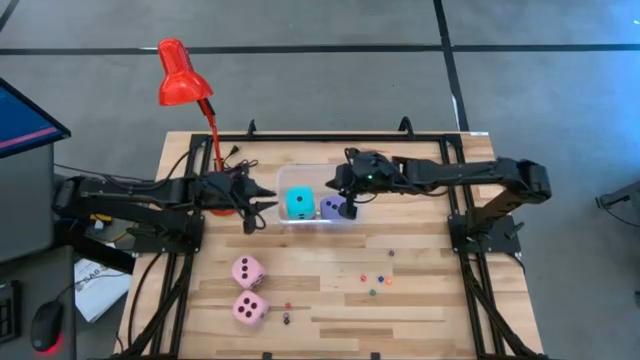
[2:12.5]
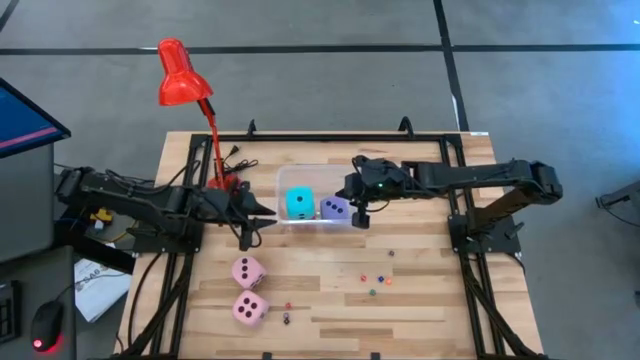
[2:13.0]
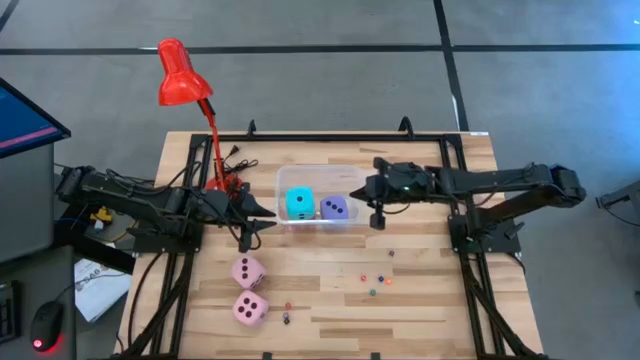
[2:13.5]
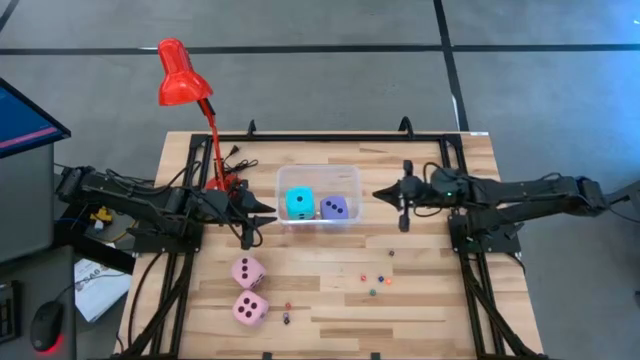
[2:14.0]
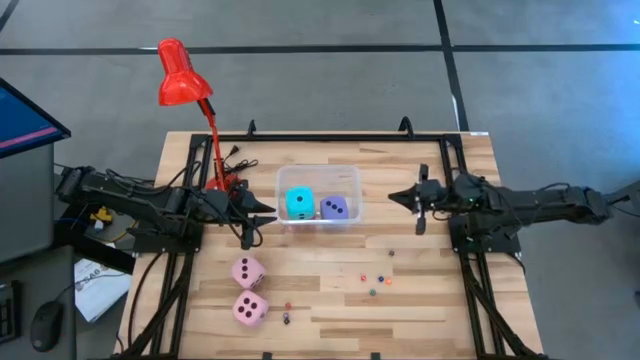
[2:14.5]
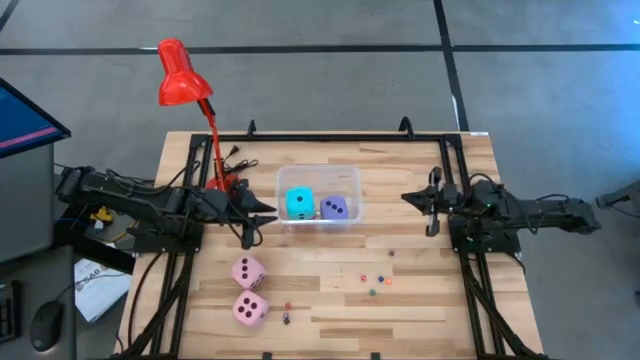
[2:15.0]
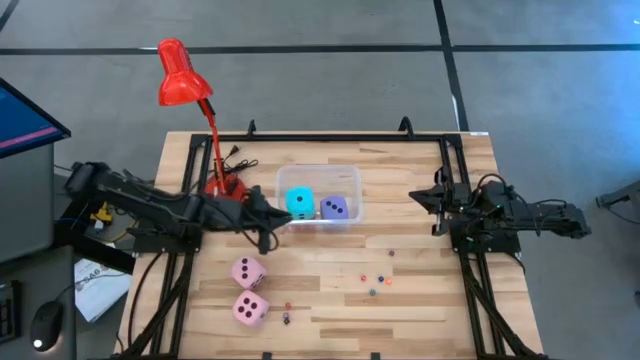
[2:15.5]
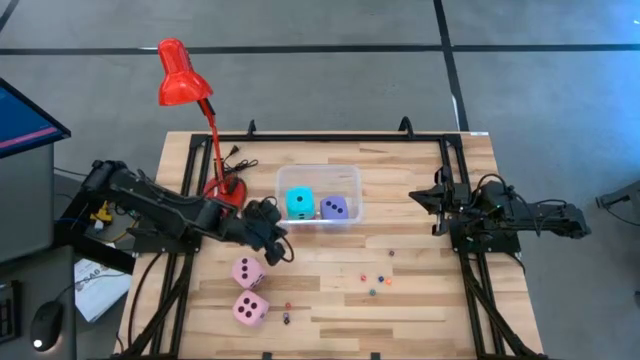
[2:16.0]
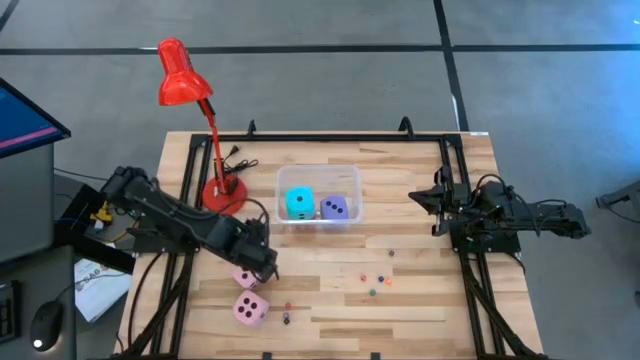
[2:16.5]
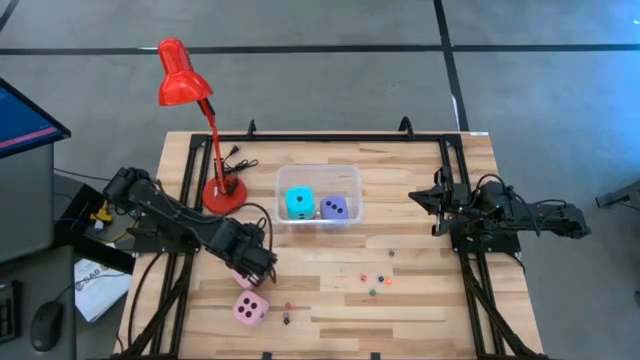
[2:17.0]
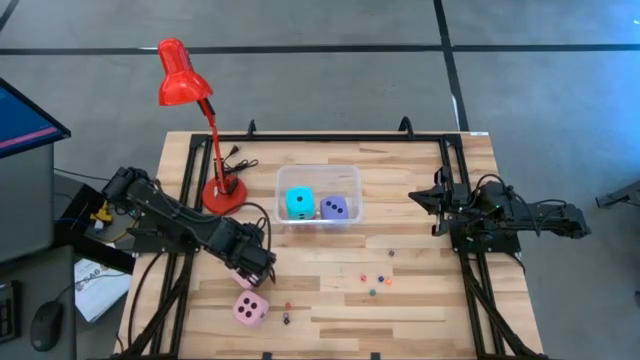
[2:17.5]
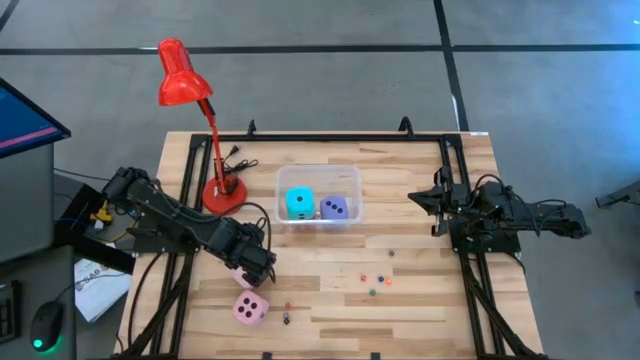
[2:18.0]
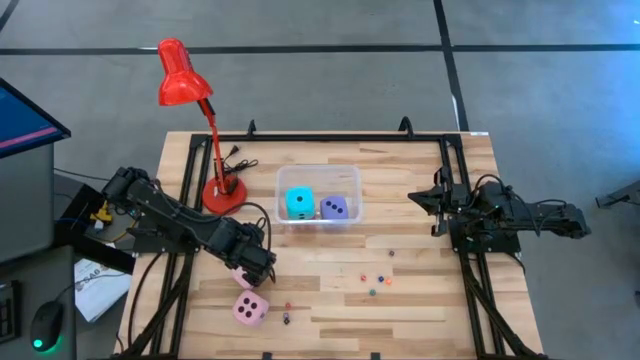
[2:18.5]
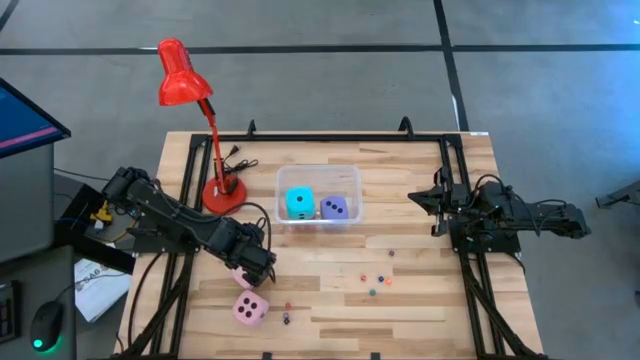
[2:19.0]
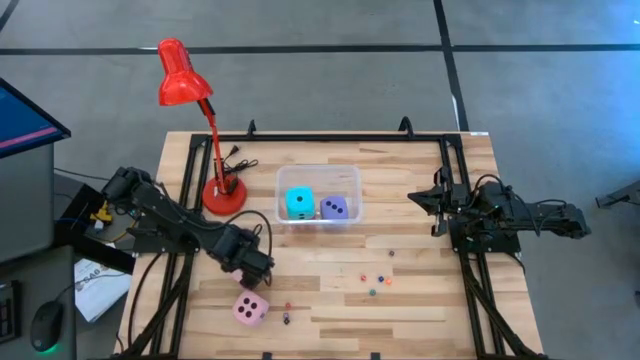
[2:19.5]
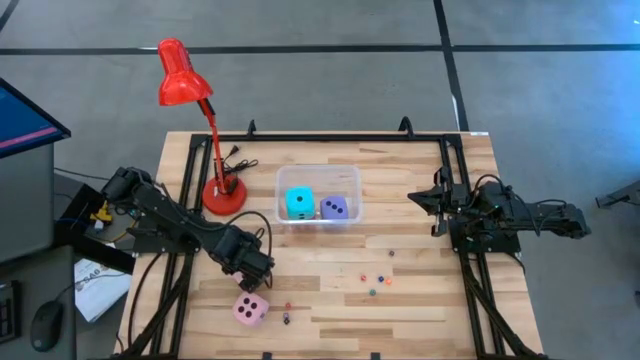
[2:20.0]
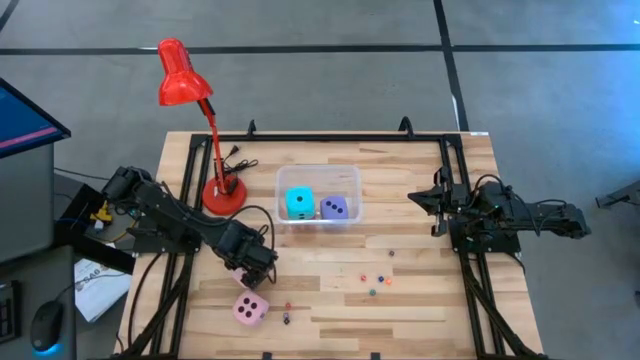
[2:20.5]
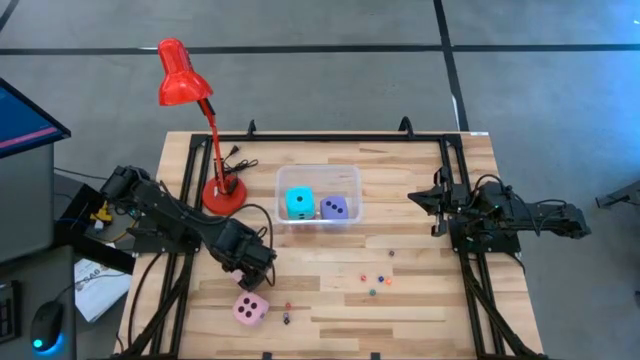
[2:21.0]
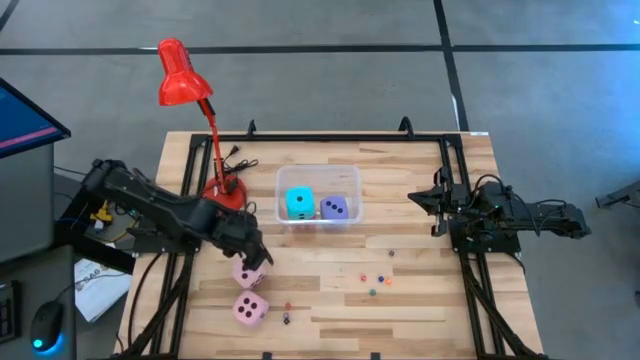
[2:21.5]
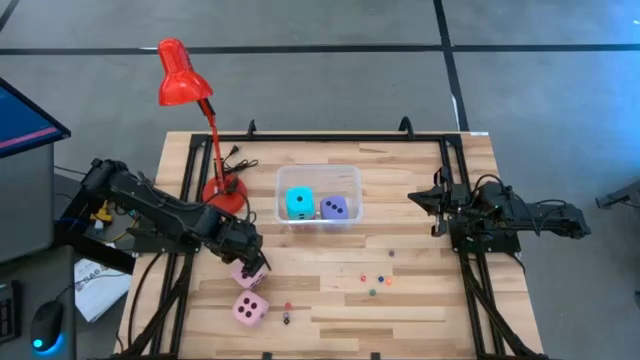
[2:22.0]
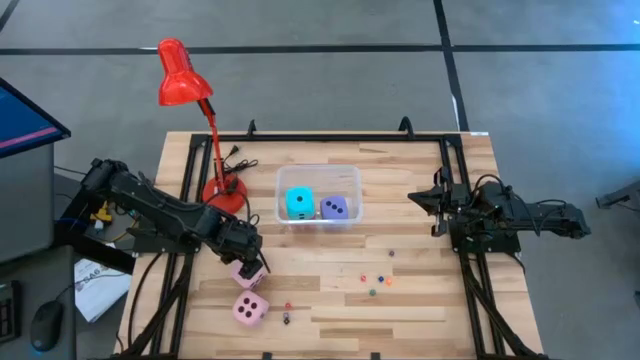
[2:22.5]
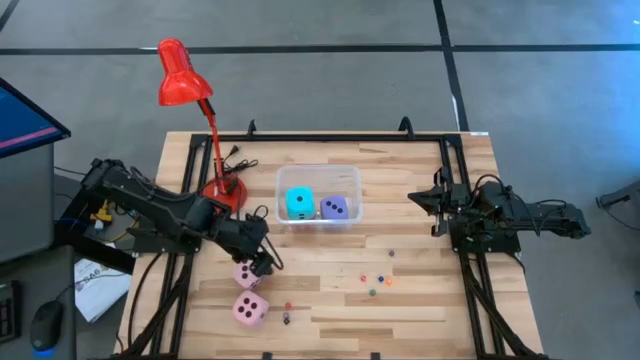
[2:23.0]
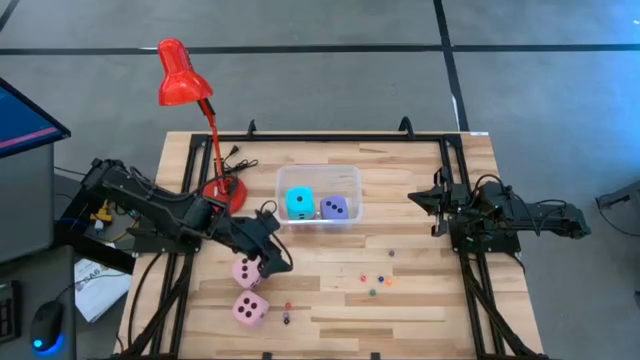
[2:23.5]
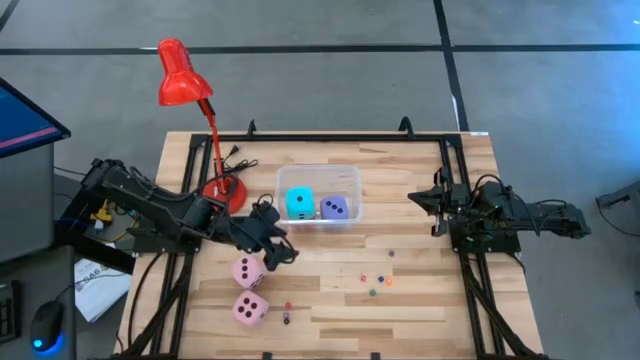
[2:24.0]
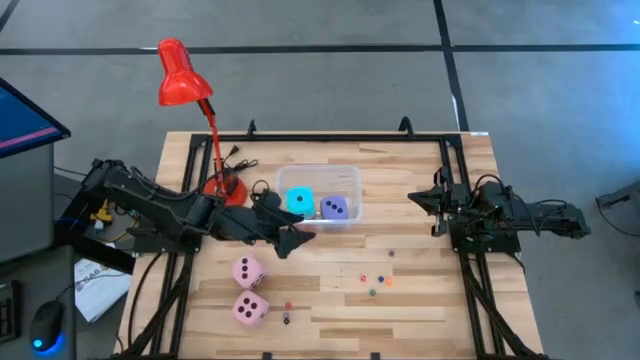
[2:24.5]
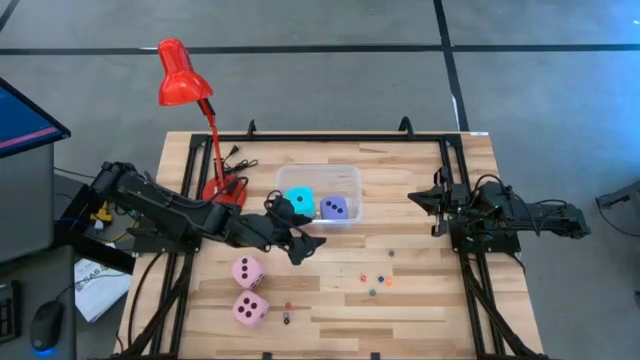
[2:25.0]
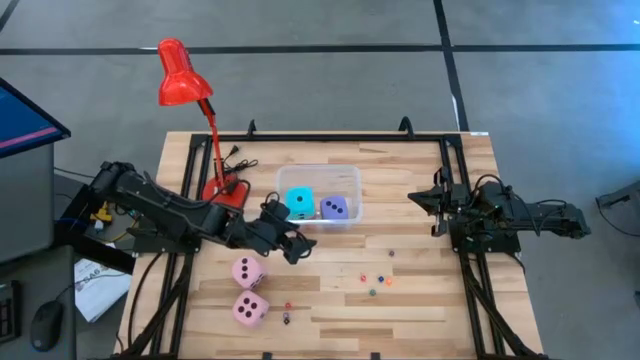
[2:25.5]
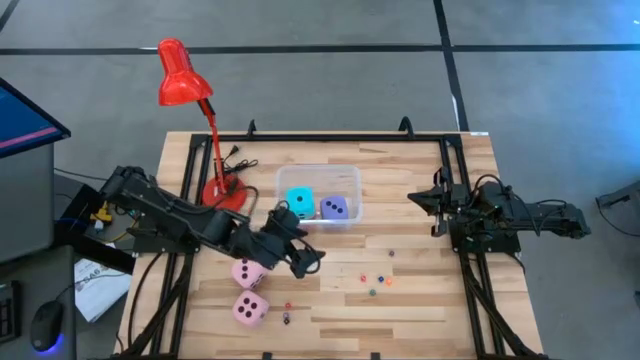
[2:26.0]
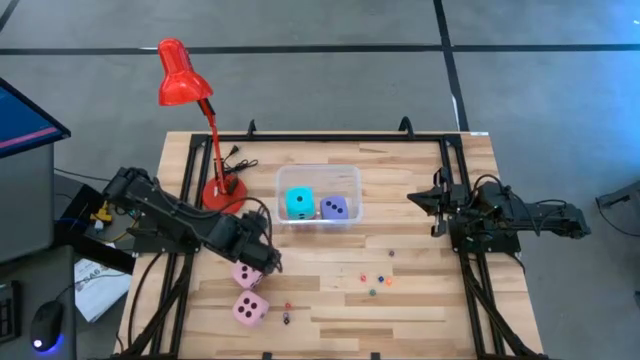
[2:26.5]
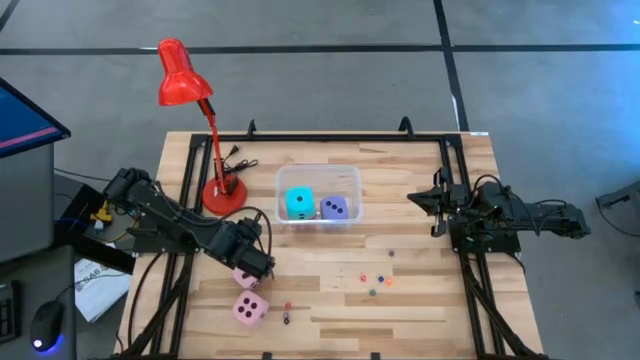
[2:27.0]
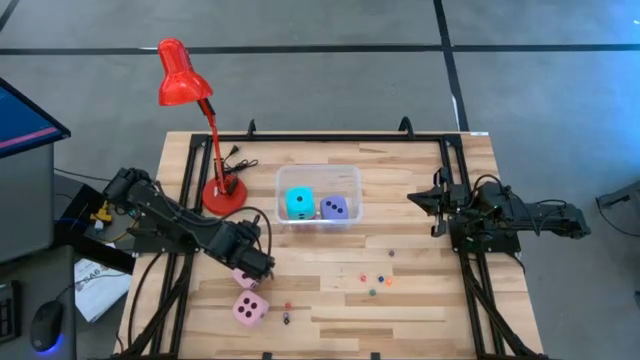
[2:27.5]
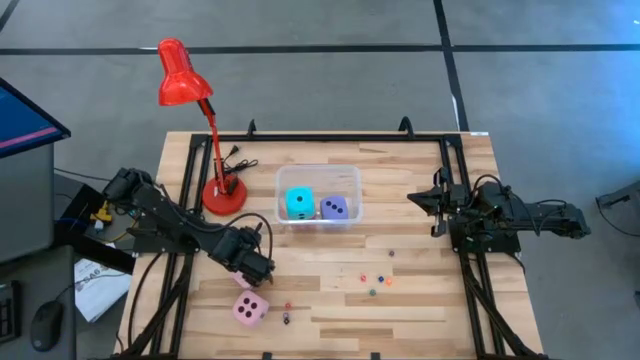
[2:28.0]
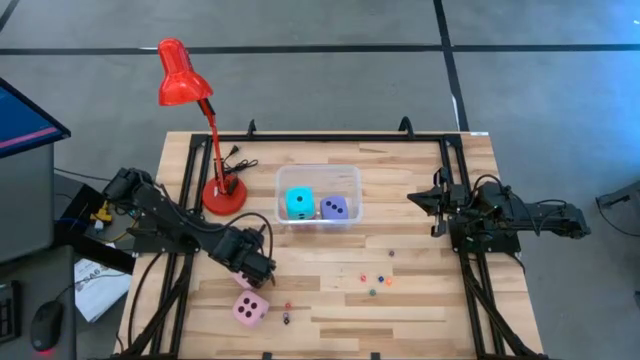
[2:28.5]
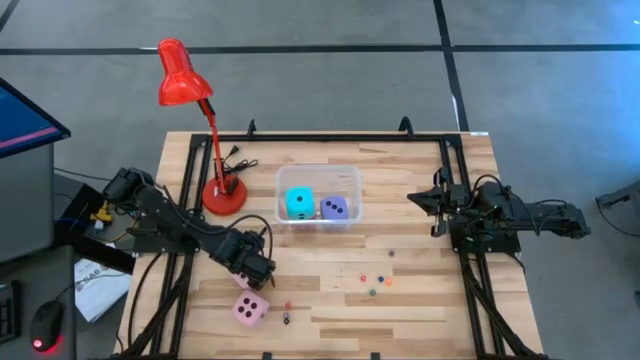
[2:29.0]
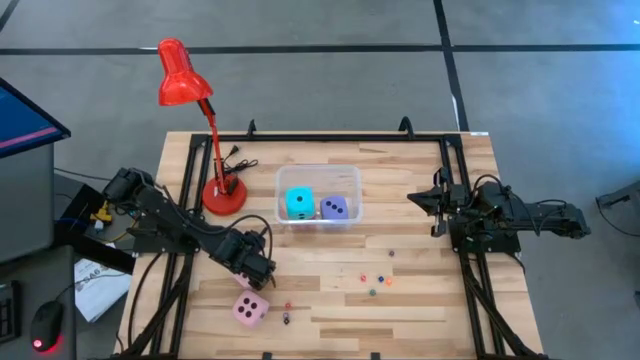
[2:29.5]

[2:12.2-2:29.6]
Task: Pick & Place Dice
Put the large pink die into the transparent bin

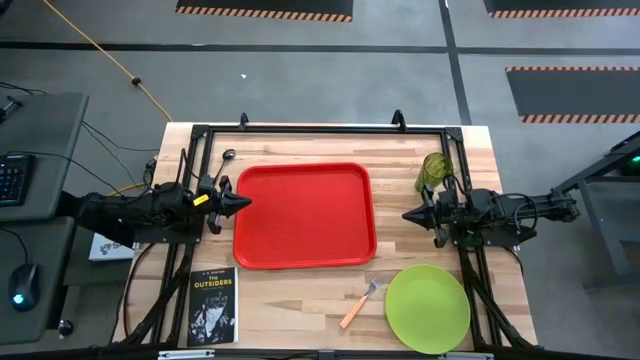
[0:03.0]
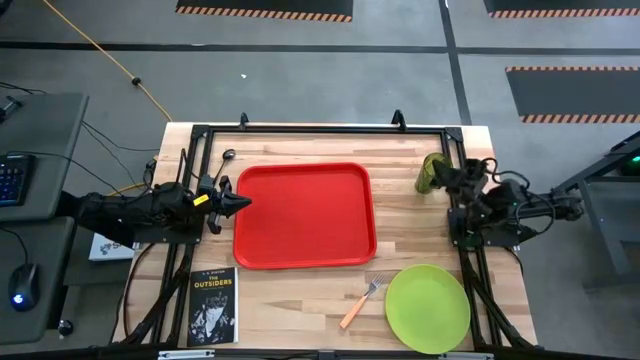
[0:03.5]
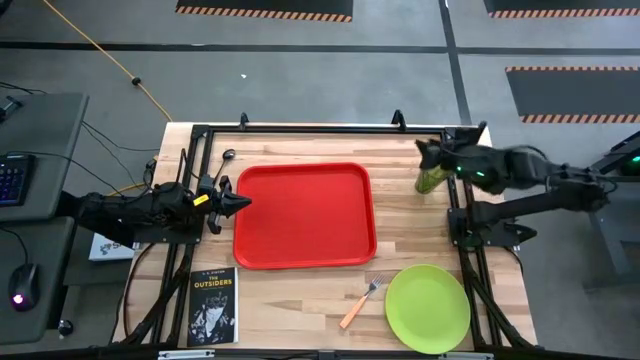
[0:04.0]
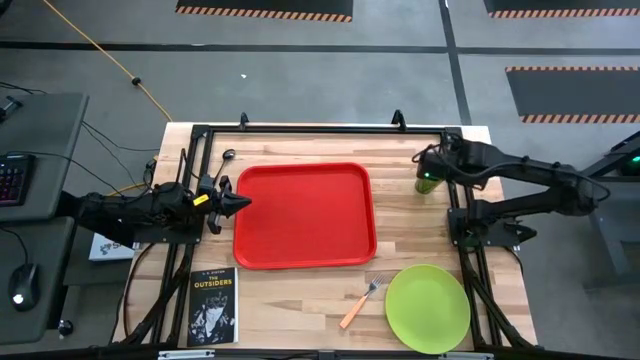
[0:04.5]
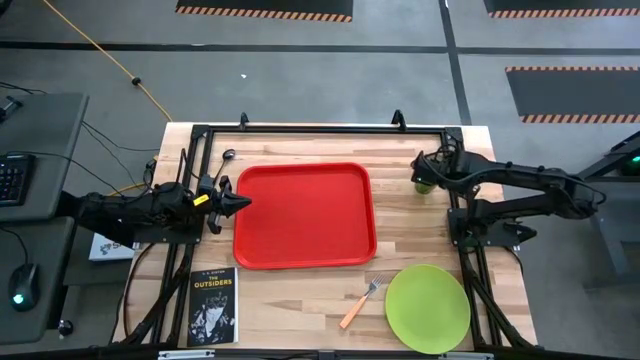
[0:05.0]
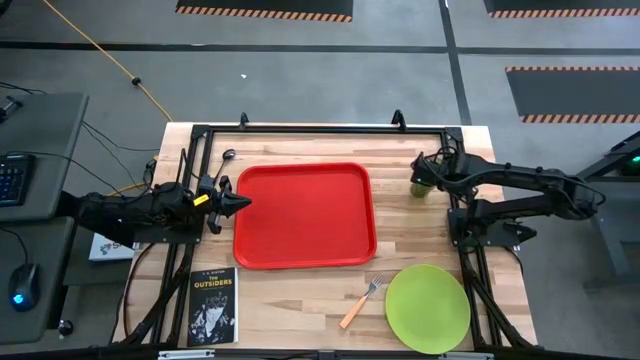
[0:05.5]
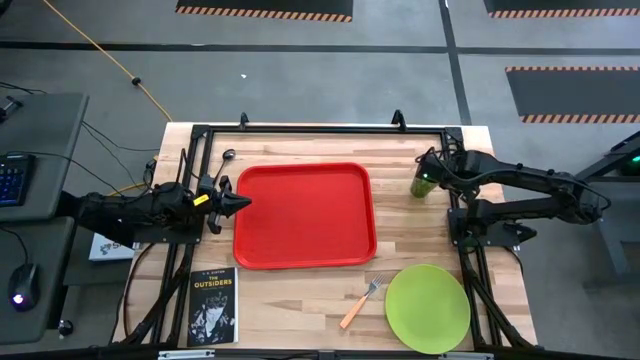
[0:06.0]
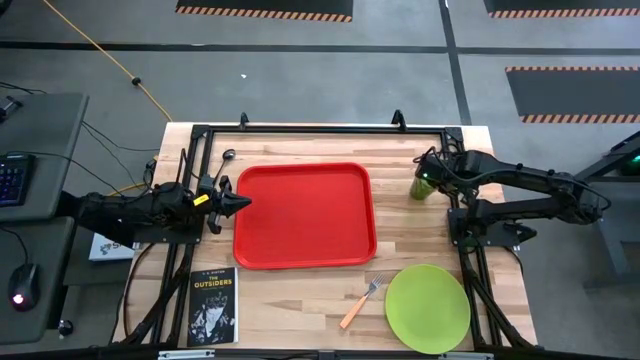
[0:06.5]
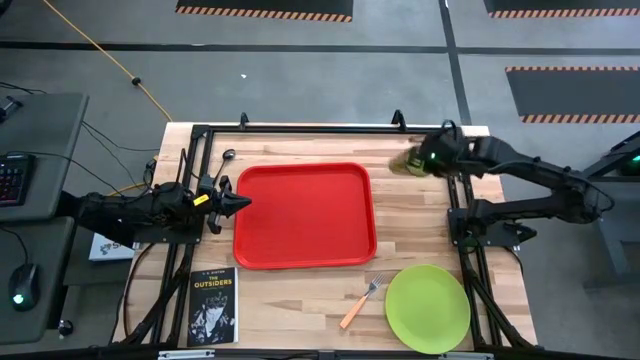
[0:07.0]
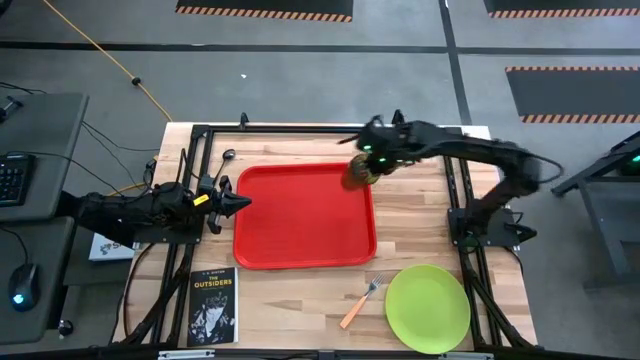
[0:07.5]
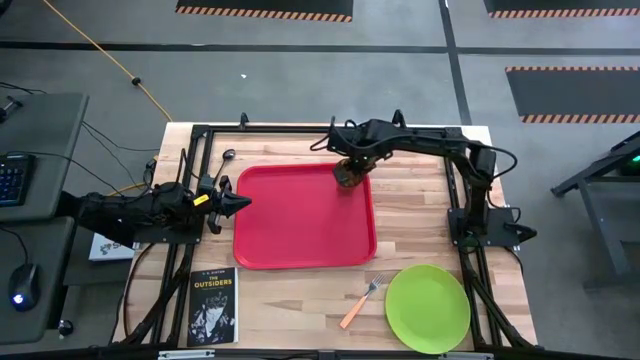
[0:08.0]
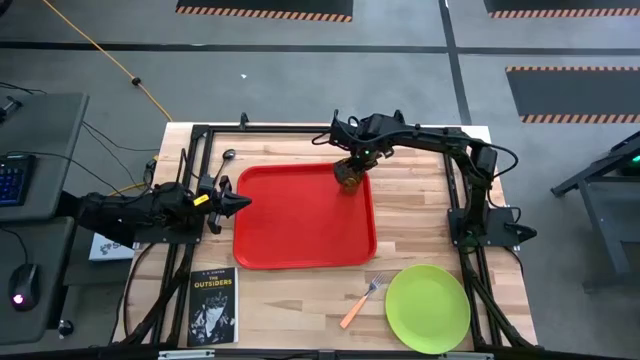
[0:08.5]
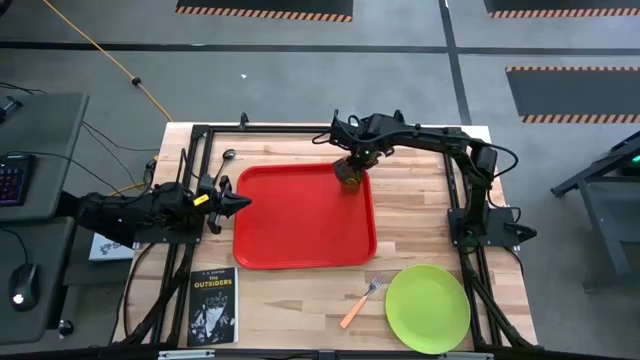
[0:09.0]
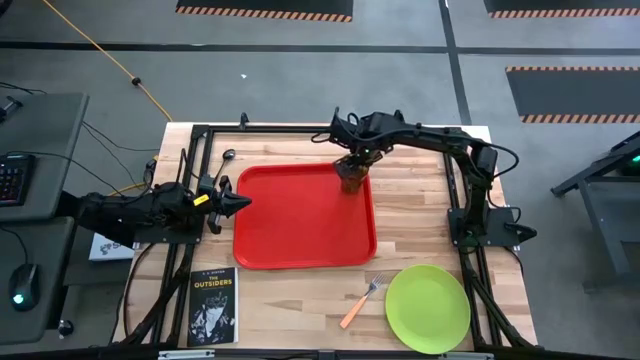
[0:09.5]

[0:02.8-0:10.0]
Task: Pick and place plate/cup/fork/spoon on tray
Put the green cup to the top right side of the red tray
